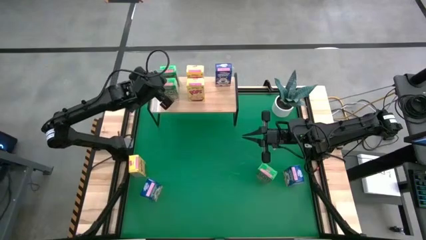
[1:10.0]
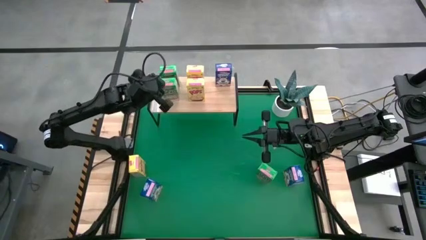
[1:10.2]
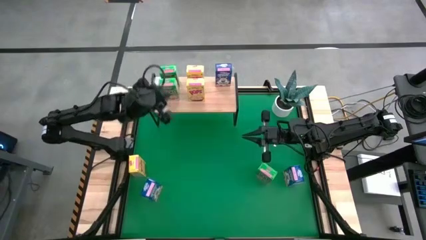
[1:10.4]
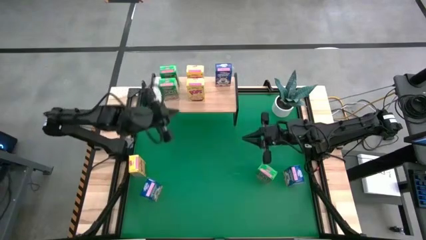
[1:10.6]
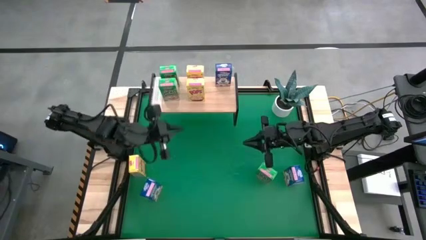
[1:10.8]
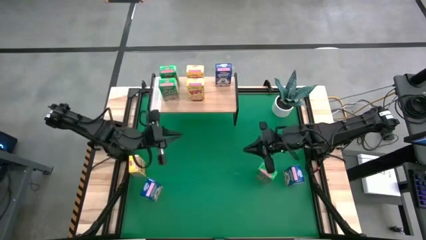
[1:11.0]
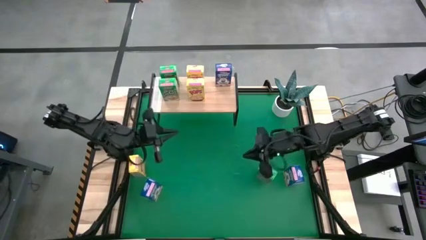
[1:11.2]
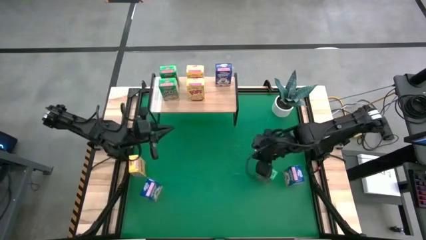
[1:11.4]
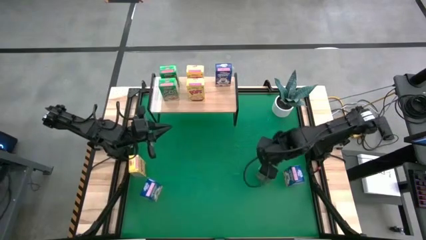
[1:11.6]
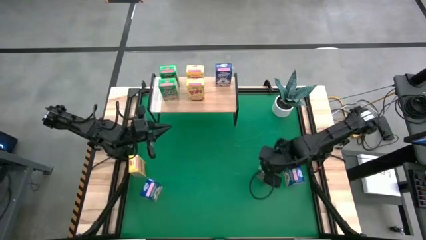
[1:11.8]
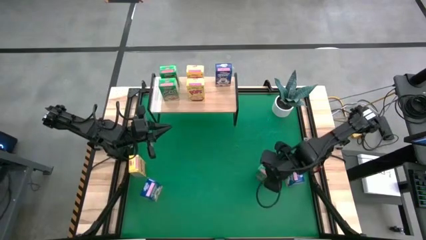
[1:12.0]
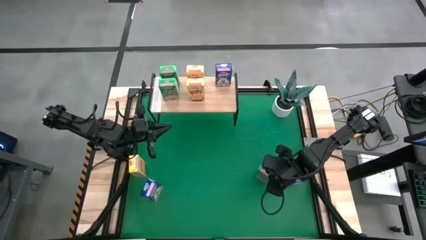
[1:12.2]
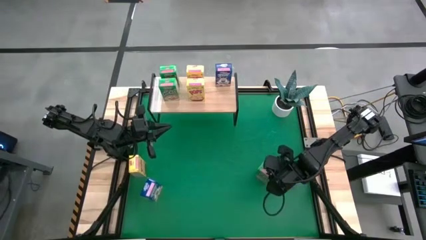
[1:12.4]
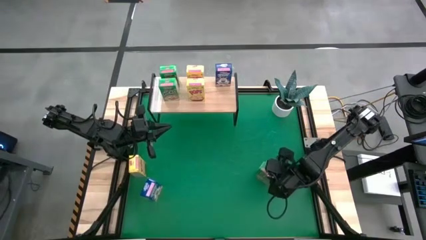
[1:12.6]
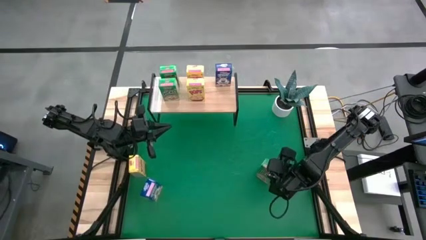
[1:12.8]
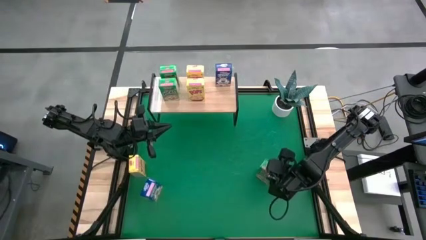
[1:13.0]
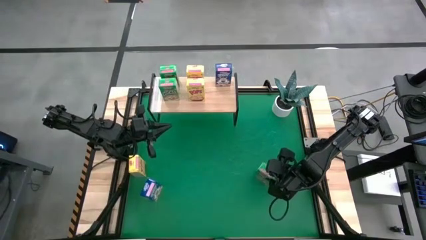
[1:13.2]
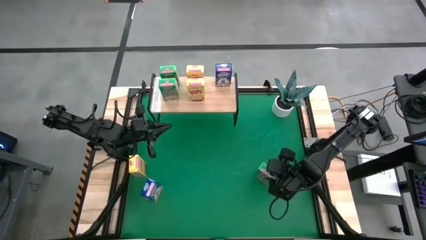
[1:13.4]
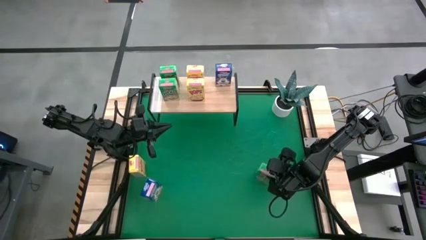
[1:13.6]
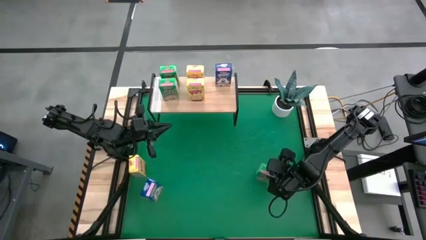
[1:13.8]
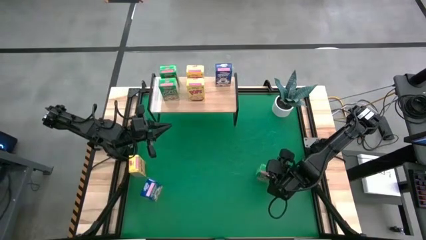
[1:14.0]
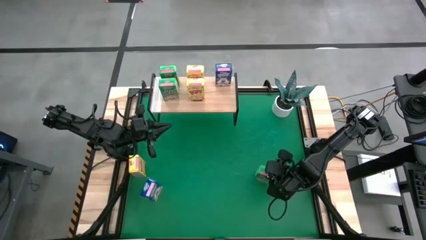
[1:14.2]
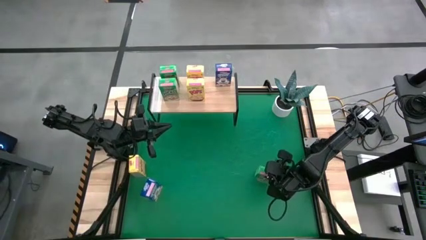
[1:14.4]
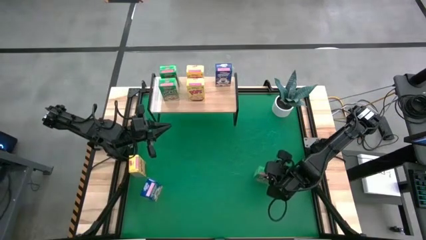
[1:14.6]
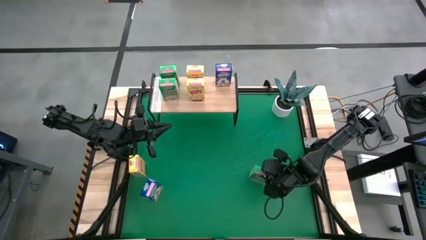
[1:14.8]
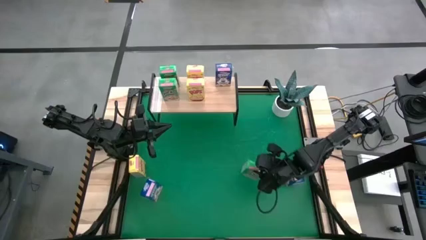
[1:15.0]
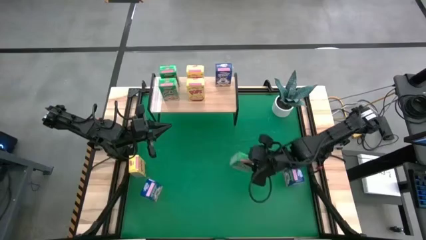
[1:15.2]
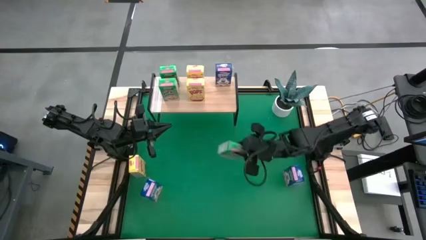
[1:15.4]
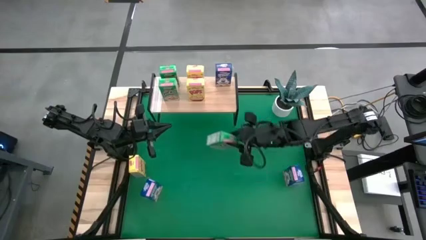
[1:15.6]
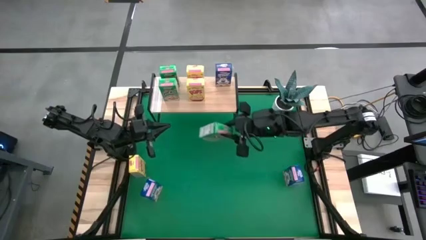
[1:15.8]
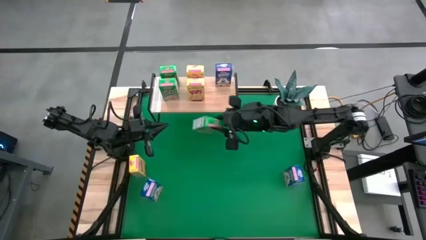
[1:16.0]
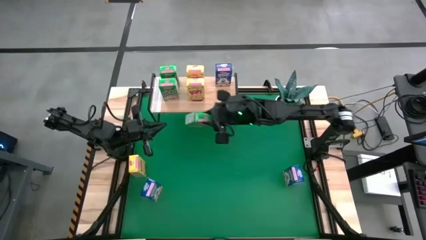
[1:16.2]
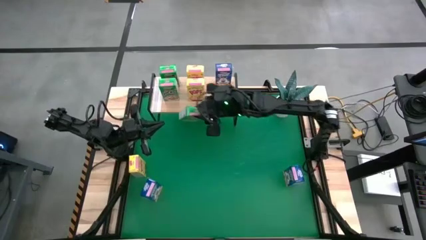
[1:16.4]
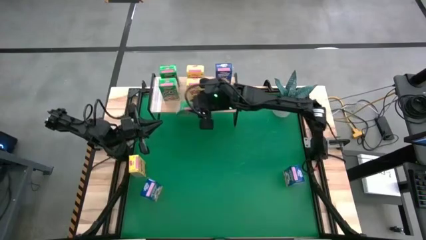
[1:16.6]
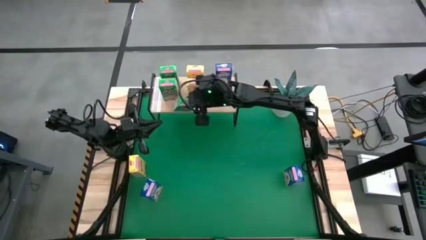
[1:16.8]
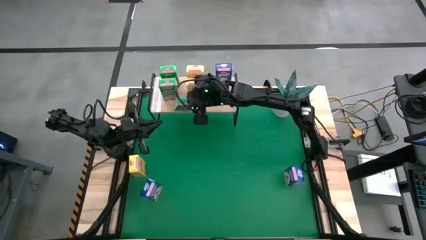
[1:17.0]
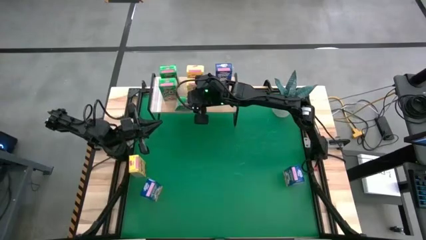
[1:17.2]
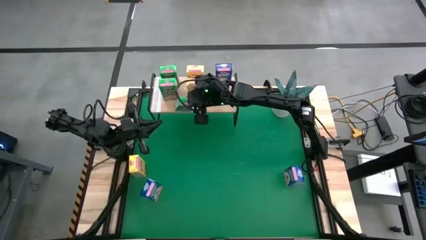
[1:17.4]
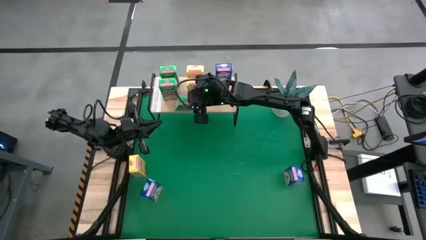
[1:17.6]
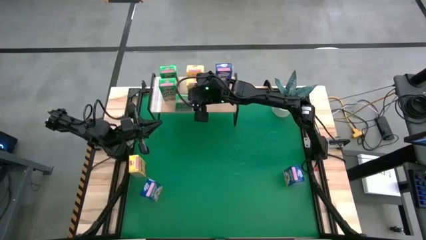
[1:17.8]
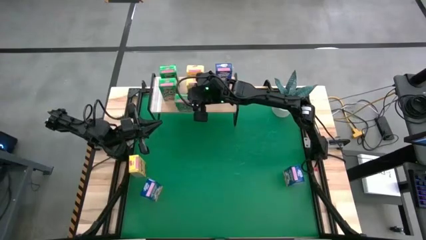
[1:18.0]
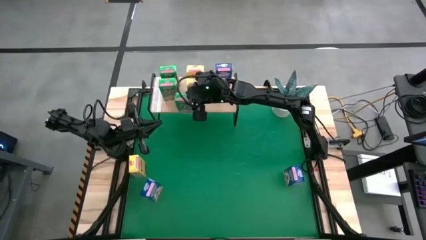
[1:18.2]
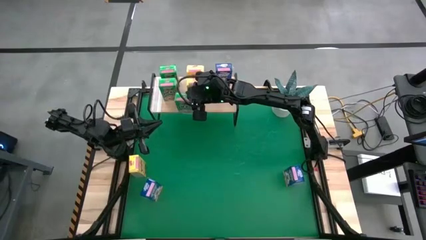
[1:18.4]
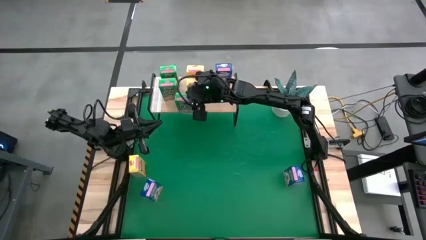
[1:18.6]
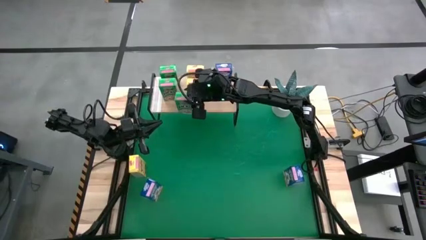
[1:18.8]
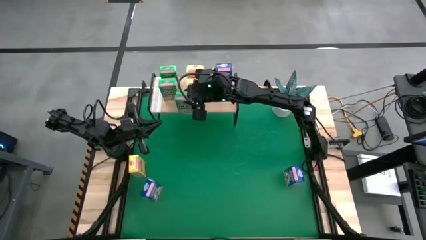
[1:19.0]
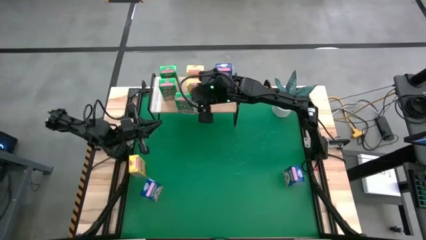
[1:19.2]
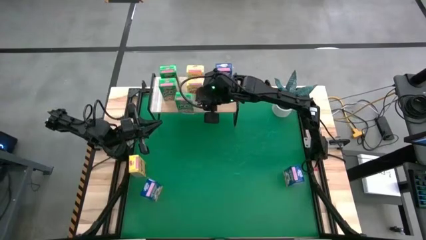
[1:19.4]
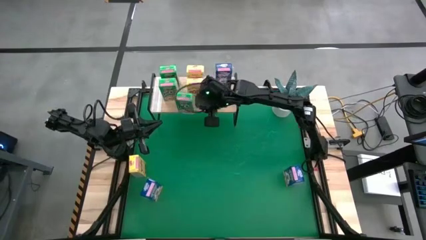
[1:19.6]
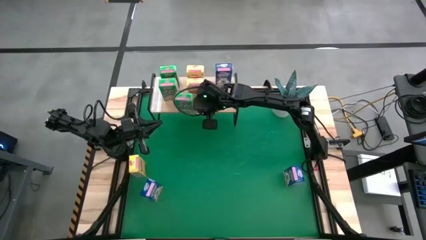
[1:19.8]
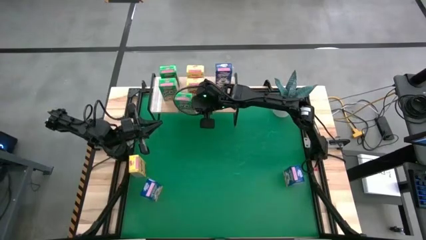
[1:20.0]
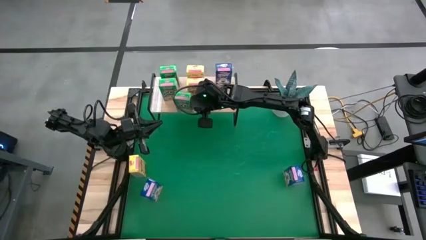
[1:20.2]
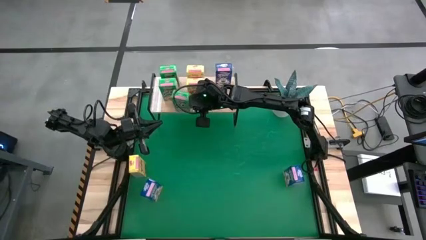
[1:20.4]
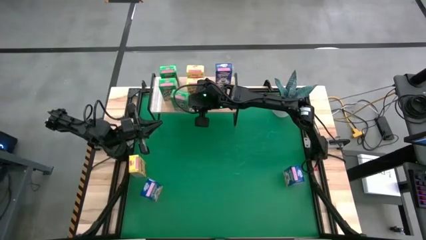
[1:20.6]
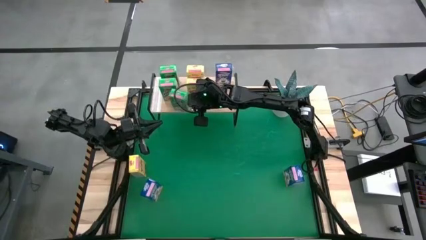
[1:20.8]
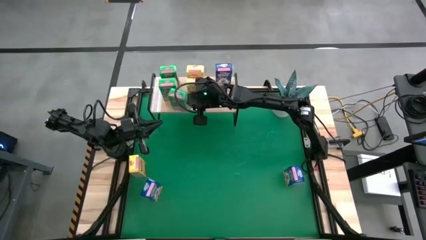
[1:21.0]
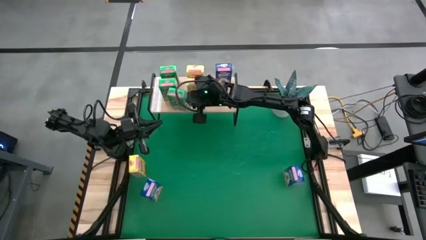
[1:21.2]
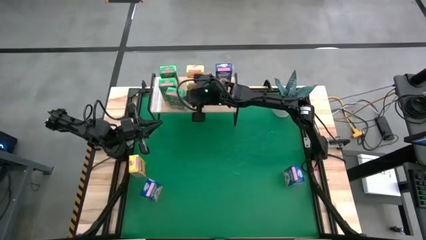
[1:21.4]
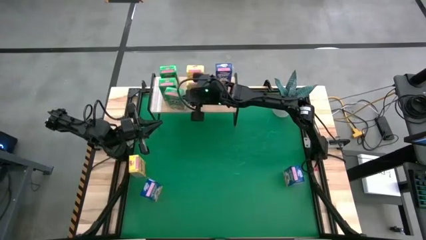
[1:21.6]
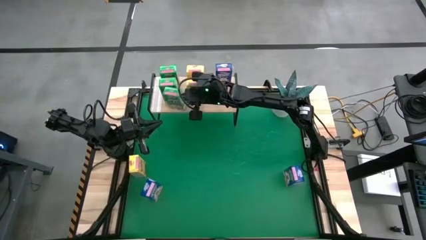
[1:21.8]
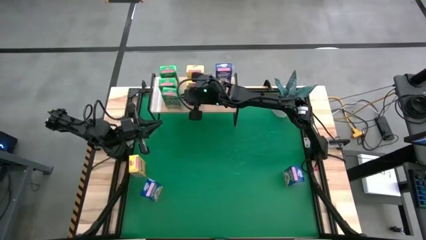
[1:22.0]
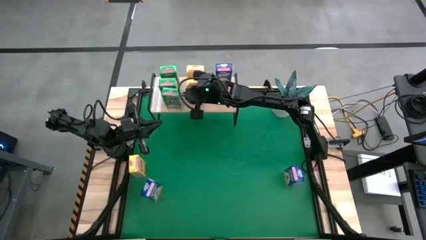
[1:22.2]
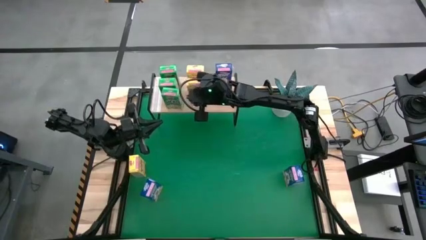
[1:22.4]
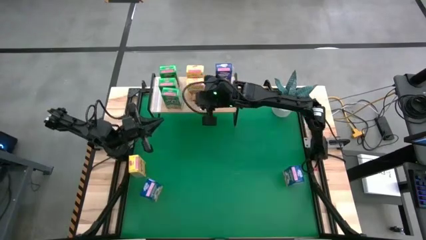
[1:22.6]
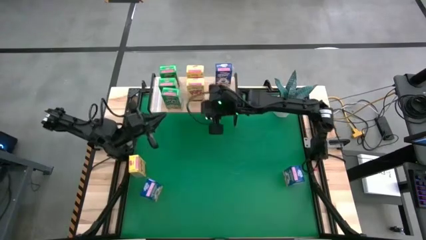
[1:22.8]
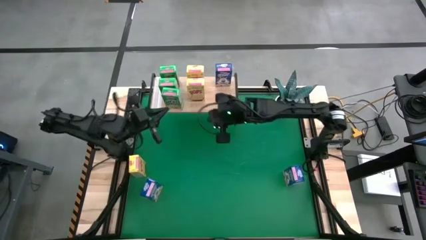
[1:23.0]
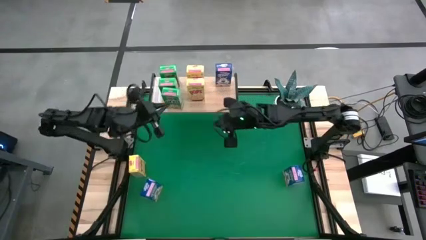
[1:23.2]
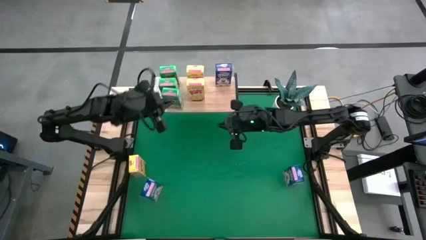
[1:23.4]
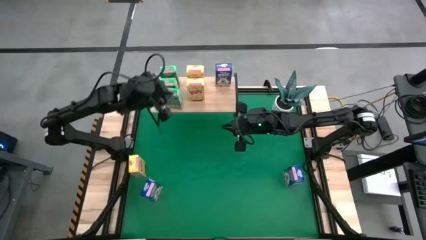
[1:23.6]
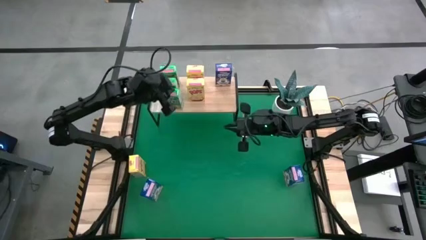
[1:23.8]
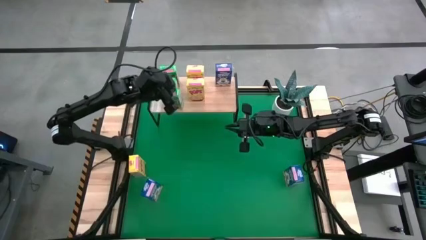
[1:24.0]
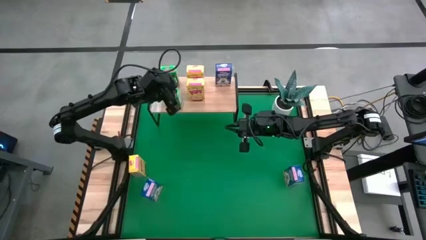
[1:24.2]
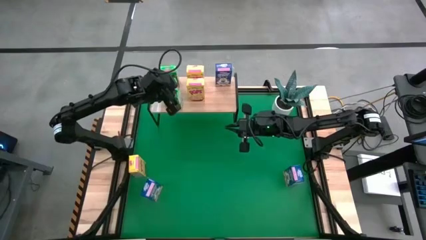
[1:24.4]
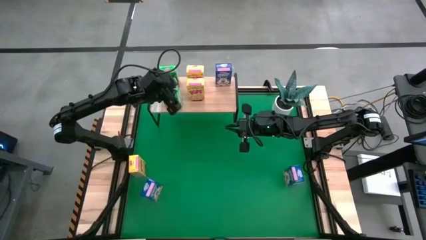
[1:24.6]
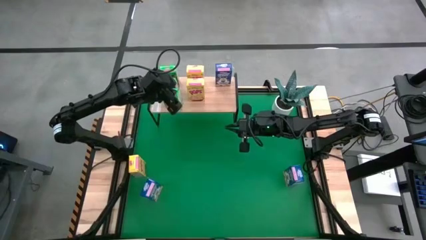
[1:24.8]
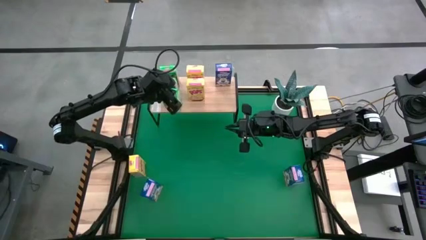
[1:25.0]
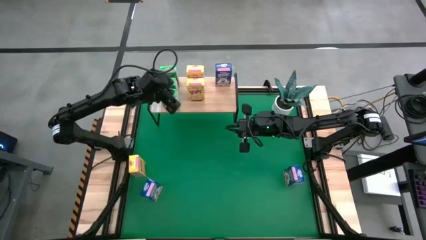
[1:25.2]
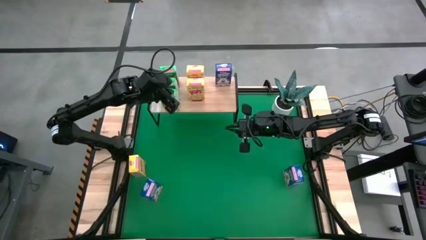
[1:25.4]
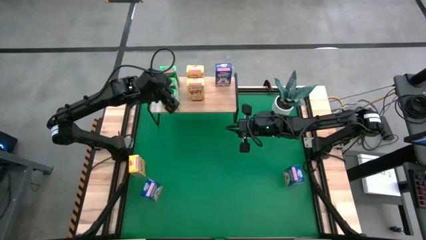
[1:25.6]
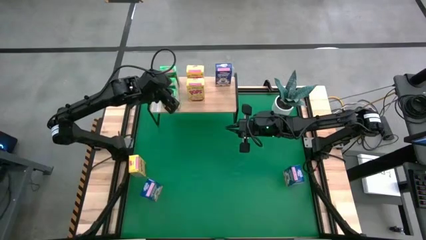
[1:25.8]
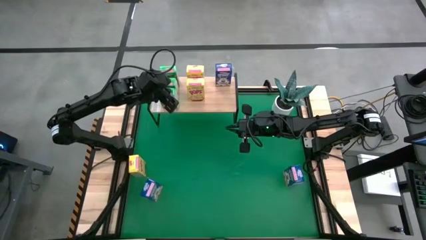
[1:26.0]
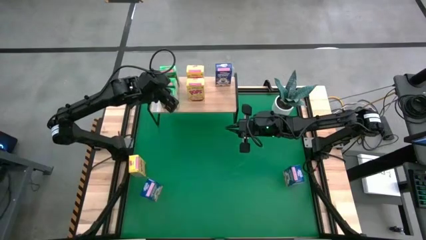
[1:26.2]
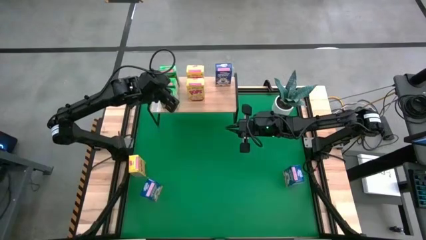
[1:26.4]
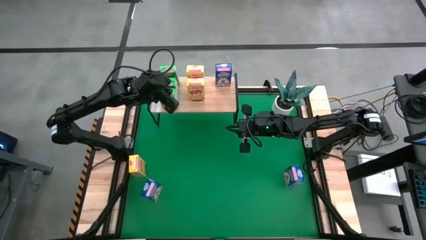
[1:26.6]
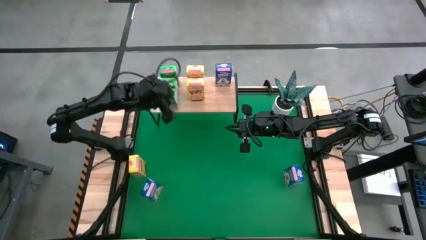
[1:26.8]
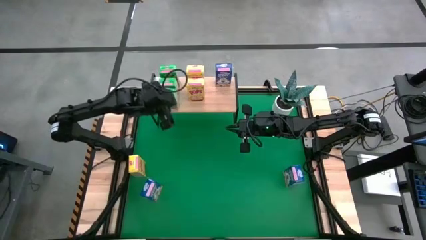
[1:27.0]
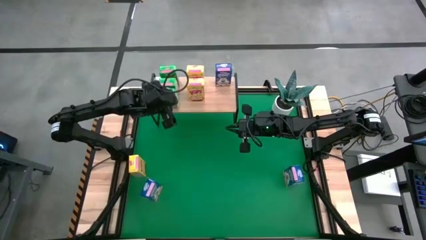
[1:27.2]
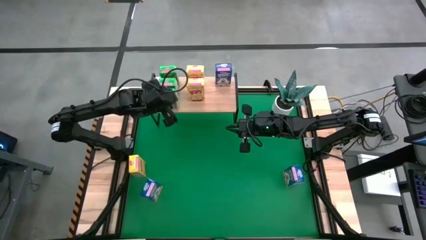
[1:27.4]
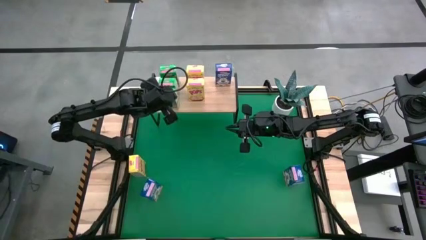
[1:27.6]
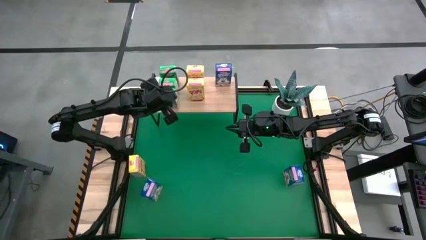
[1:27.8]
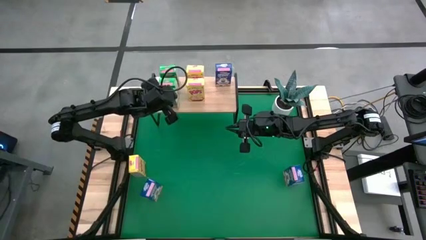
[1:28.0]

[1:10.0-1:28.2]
Task: Stack cereal on shelf
Put the green cereal box on the shelf aligned with the other green cereal boxes
